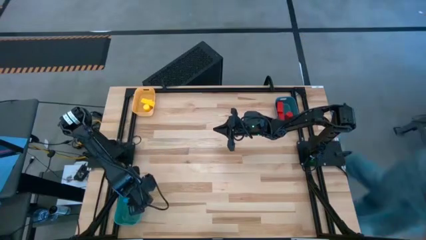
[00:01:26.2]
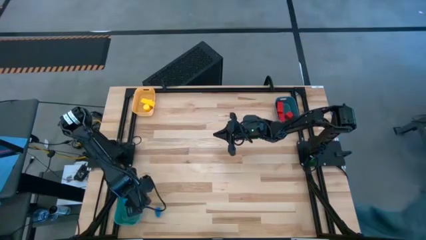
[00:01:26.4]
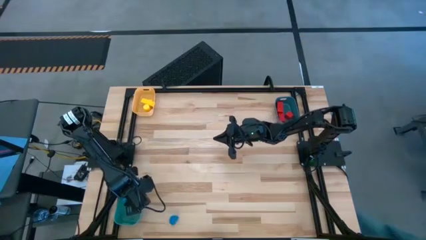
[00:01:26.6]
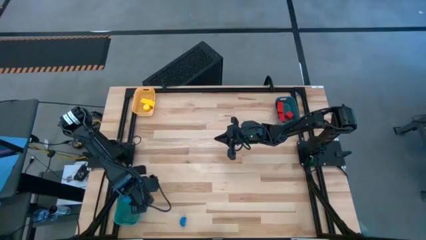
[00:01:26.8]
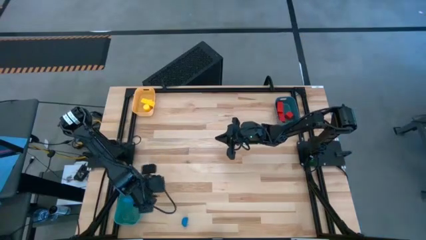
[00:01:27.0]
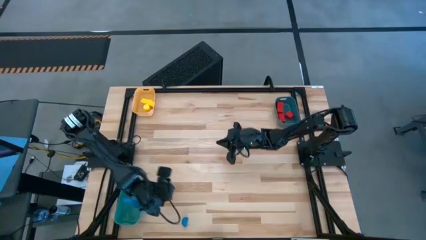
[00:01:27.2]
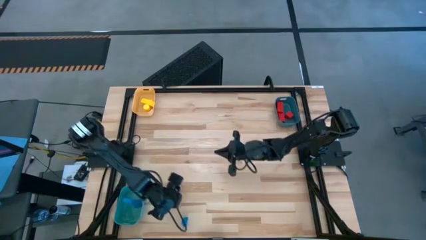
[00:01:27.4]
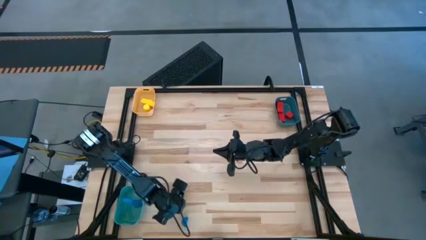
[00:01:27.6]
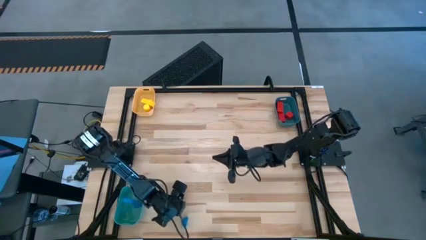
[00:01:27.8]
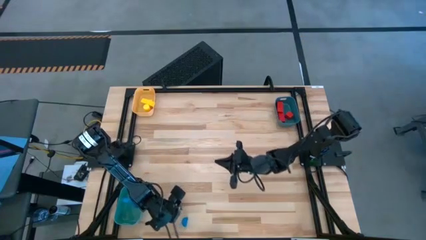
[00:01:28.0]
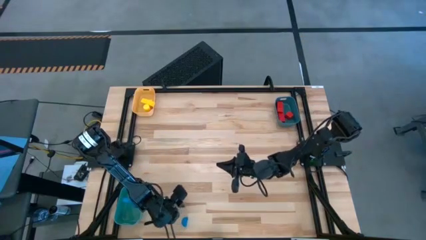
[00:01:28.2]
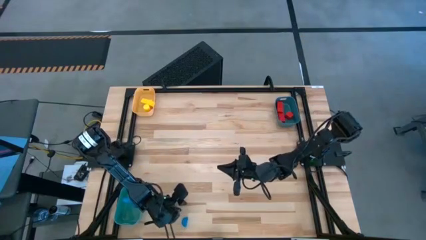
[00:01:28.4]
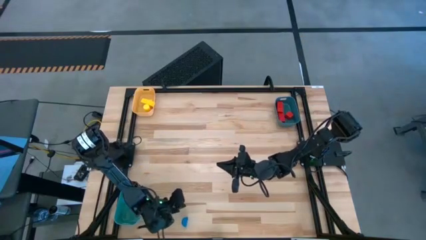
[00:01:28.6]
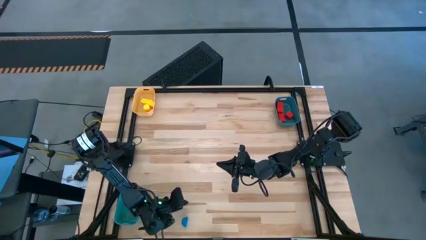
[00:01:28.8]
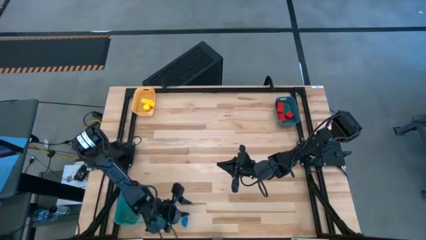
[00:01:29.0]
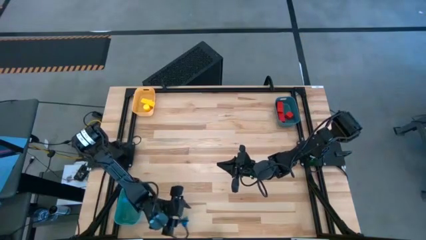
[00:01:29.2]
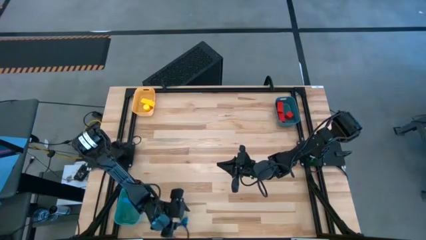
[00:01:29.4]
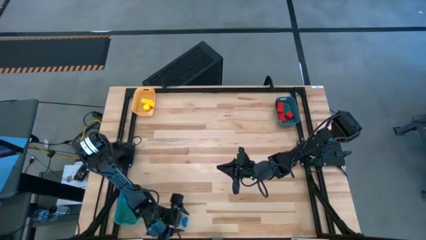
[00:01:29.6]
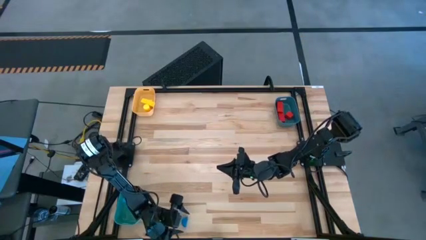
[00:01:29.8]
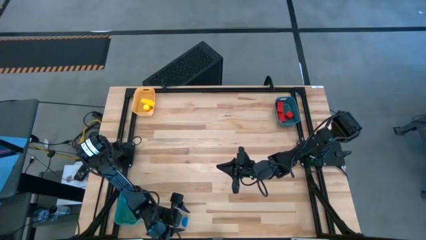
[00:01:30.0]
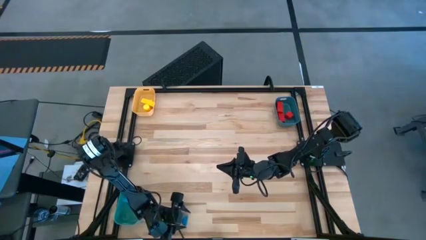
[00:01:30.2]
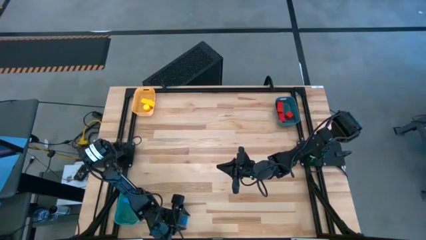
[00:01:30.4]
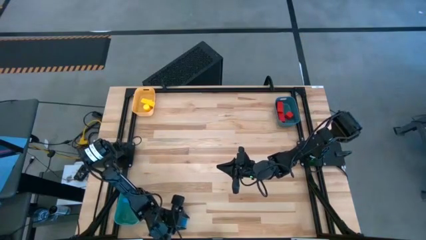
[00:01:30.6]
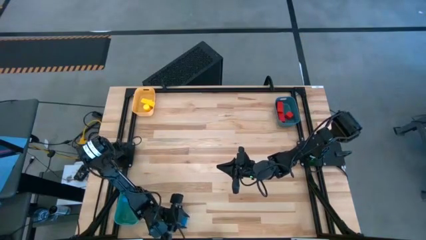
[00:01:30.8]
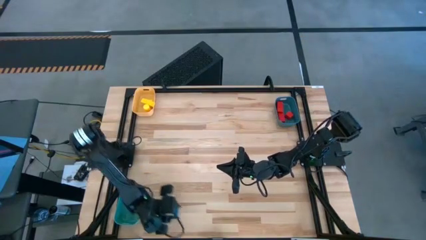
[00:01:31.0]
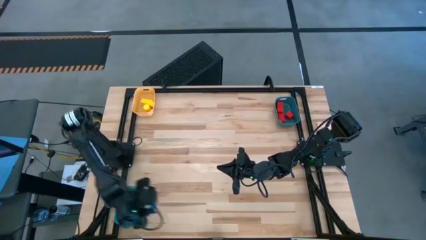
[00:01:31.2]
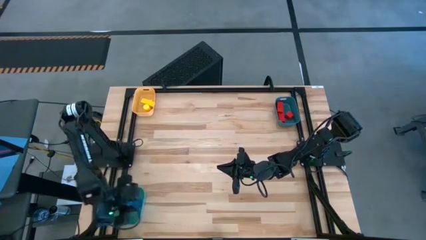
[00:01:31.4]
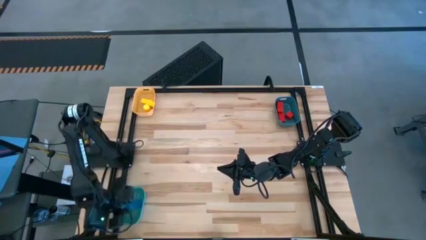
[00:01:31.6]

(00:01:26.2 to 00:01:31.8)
Task: Sort & place blocks by color
Put the blue block into the green bin

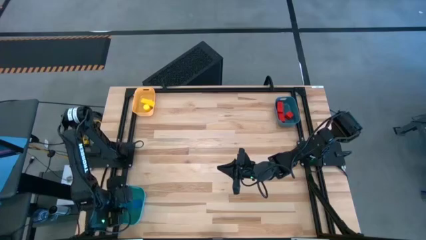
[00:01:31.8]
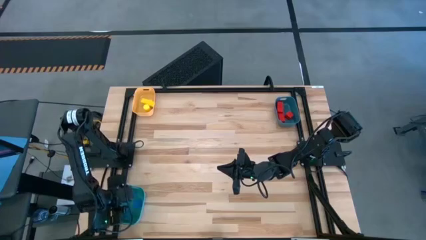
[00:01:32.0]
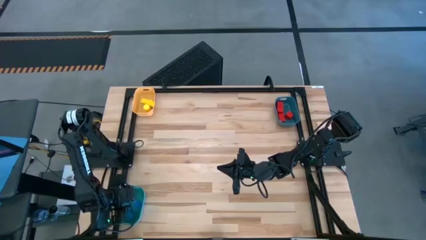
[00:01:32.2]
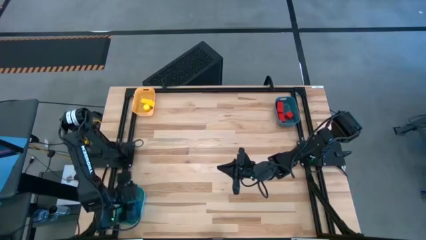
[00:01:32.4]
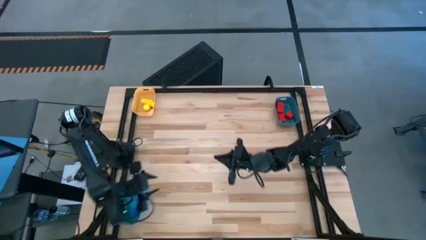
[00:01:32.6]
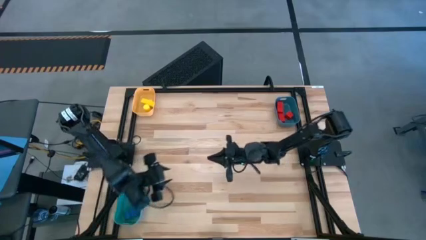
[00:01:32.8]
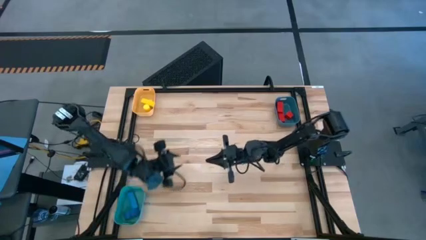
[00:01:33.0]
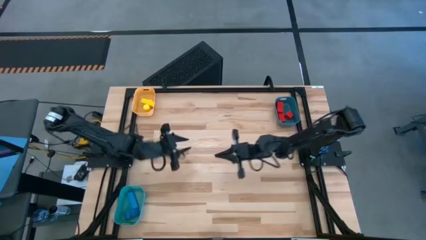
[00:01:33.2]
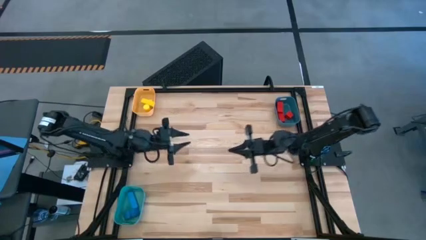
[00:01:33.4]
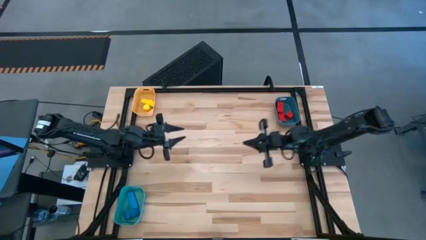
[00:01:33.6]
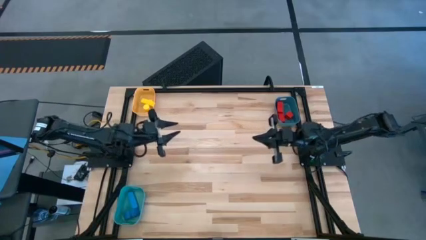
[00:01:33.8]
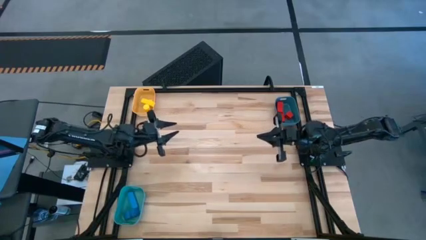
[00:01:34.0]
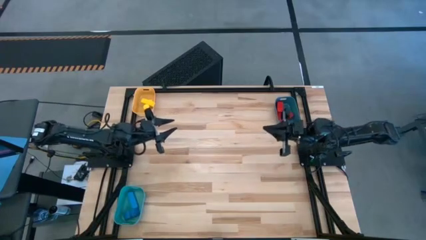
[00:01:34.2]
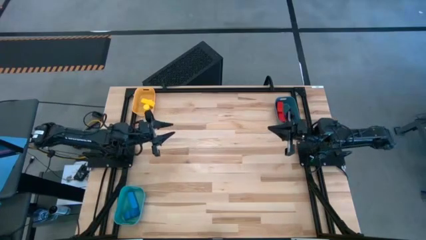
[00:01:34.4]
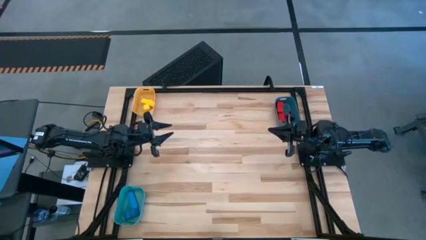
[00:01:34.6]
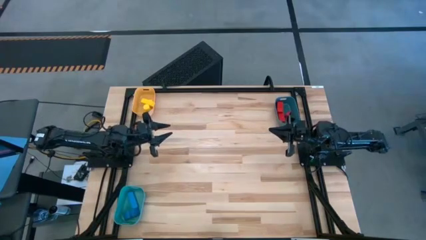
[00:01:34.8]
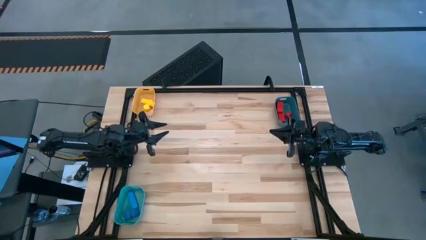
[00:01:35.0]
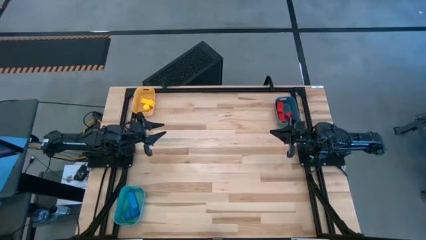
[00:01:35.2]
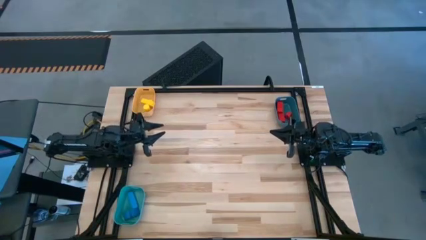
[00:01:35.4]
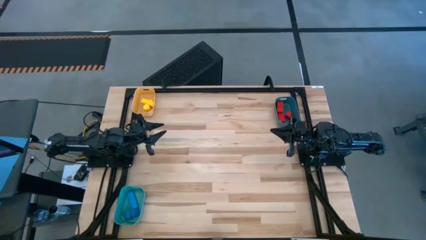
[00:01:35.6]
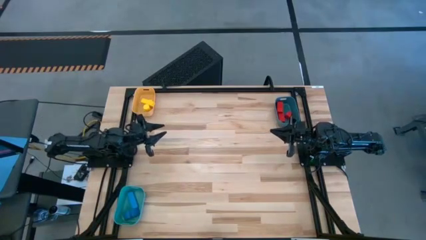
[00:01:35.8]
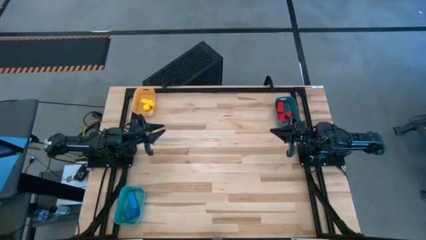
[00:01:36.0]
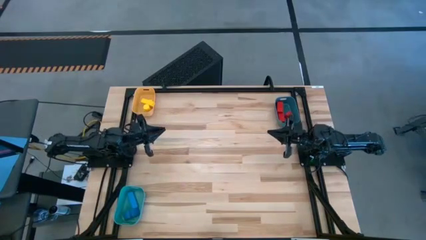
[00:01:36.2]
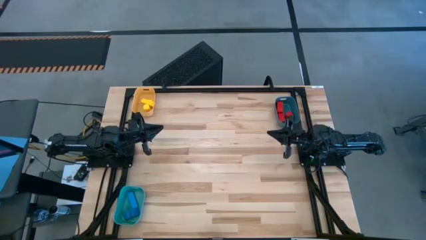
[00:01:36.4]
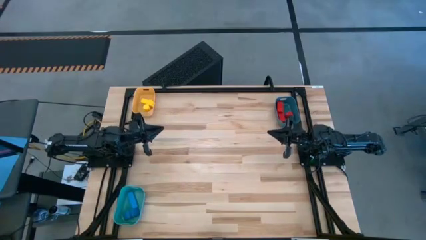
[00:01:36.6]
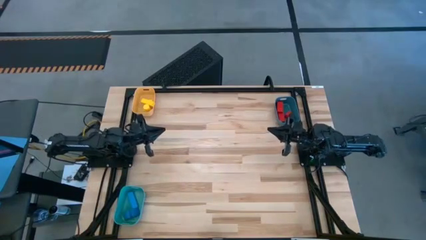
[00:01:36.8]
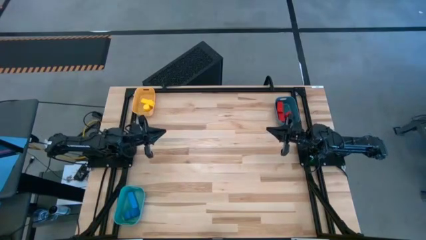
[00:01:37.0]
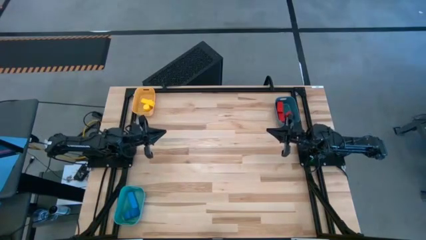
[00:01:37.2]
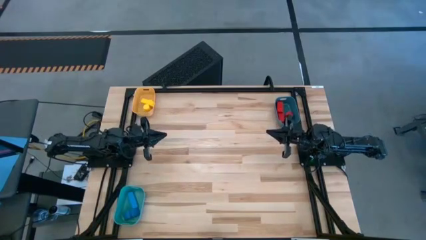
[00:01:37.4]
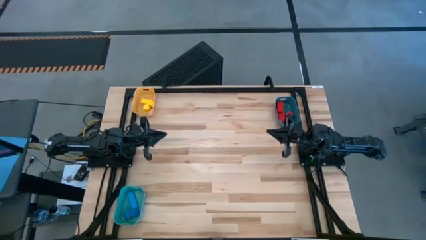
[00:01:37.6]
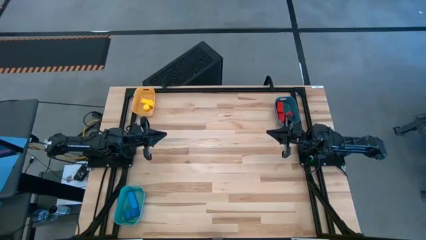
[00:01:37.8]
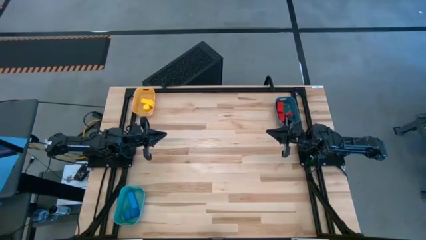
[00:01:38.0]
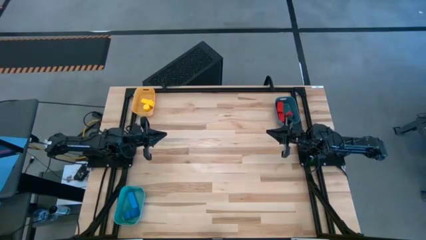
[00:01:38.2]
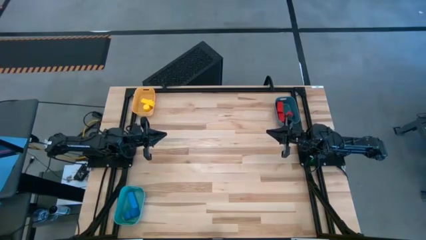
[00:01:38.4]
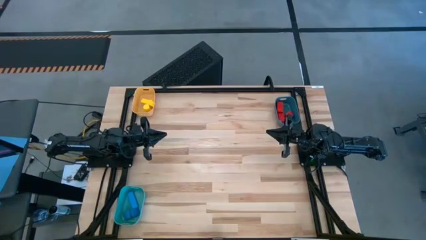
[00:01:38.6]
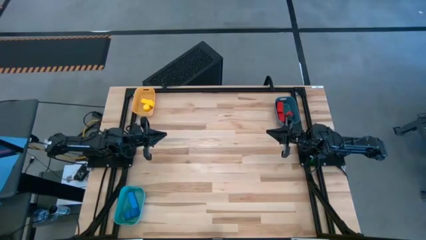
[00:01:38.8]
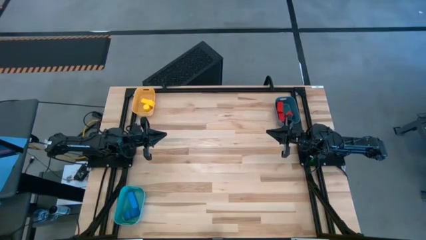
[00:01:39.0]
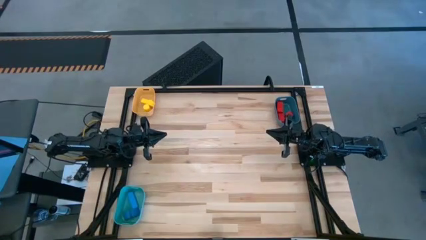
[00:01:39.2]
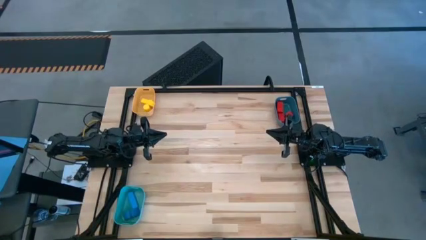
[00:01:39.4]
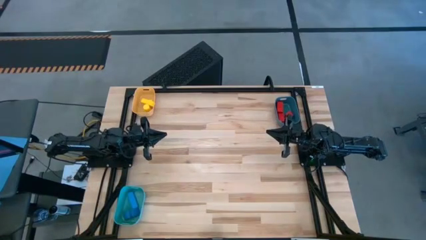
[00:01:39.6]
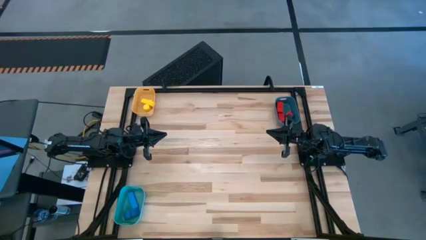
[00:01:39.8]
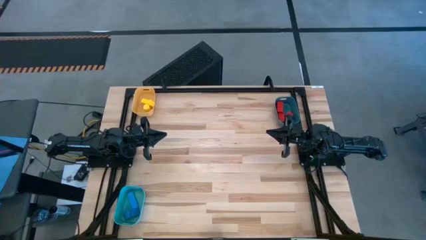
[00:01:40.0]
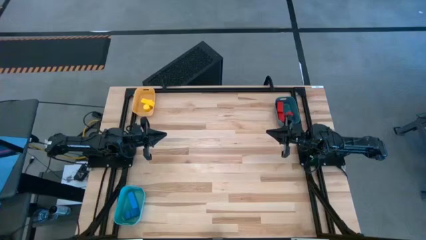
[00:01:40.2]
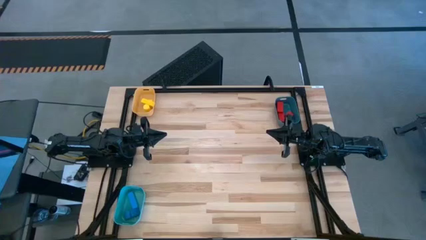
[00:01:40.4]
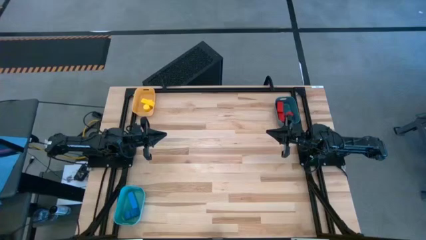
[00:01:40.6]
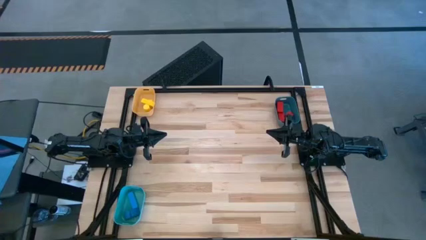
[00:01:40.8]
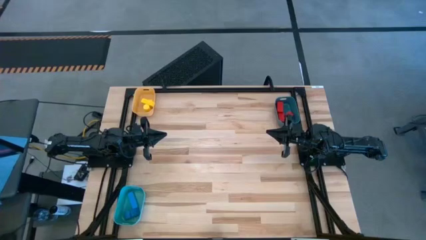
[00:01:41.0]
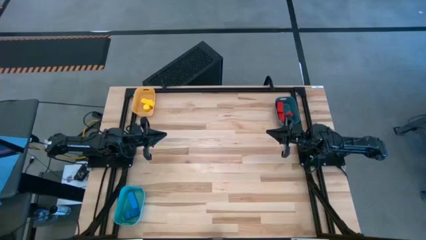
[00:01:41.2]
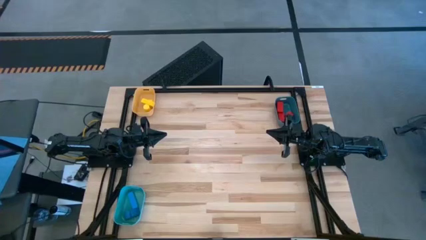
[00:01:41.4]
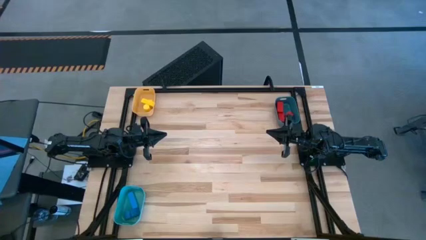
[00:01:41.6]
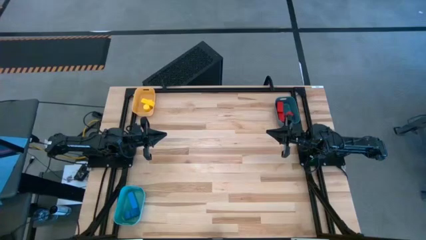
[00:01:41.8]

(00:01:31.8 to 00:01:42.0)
Return to Home Position
